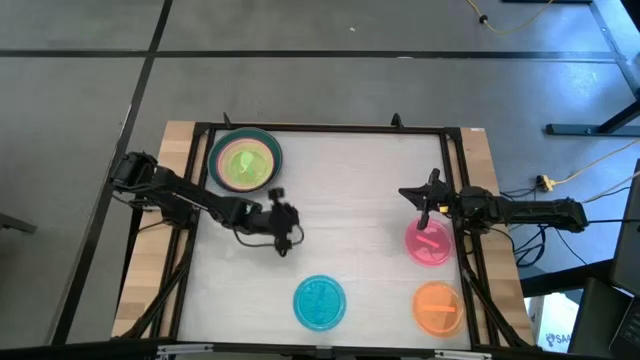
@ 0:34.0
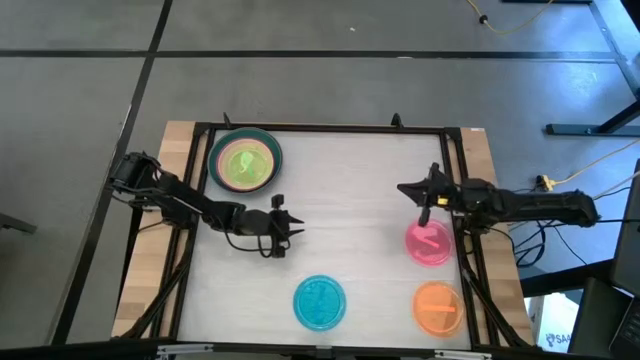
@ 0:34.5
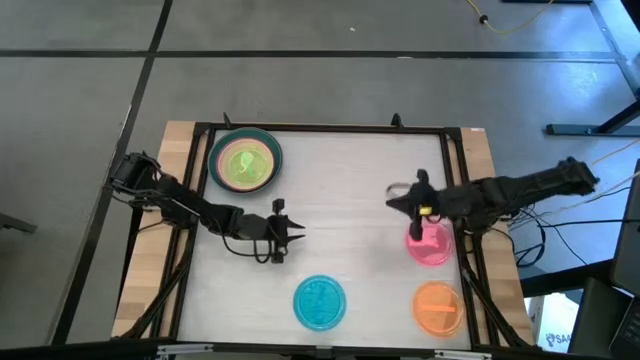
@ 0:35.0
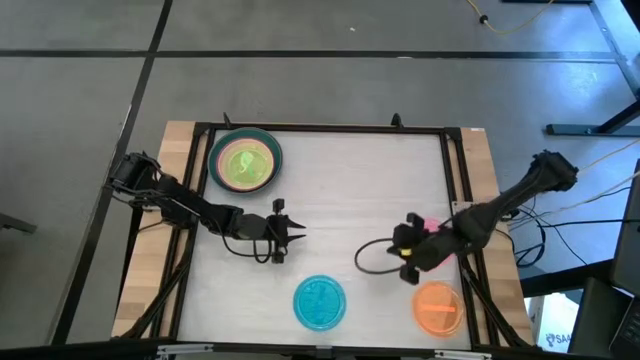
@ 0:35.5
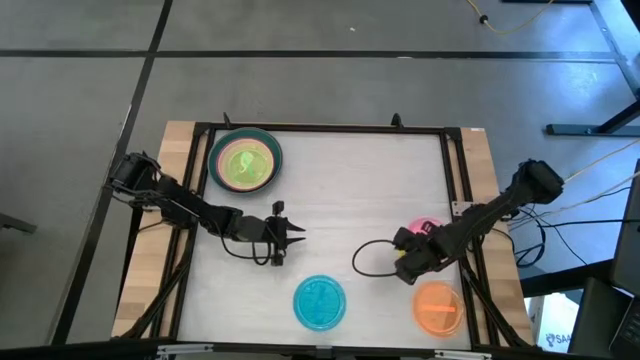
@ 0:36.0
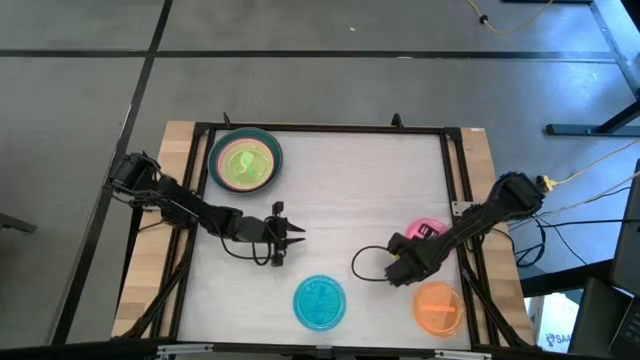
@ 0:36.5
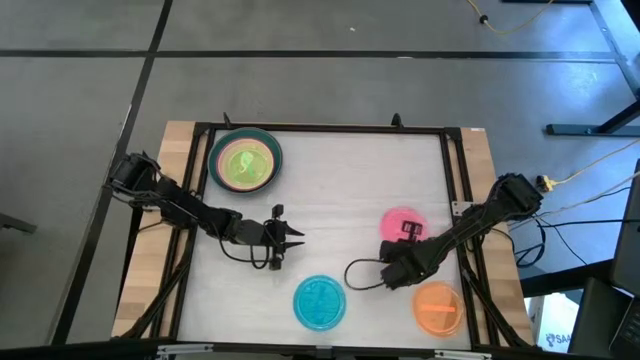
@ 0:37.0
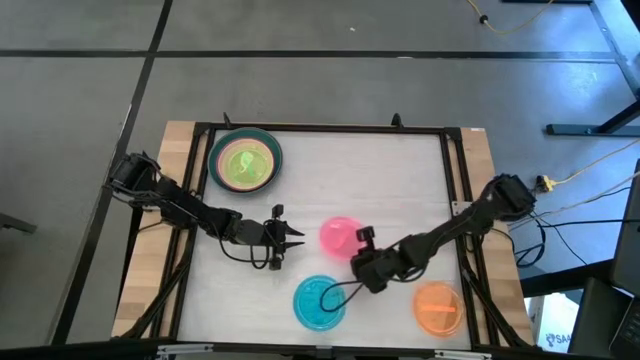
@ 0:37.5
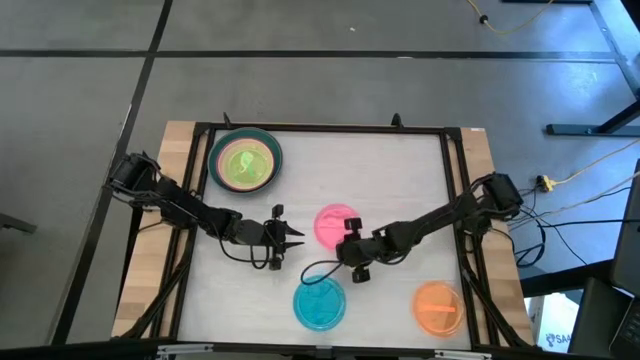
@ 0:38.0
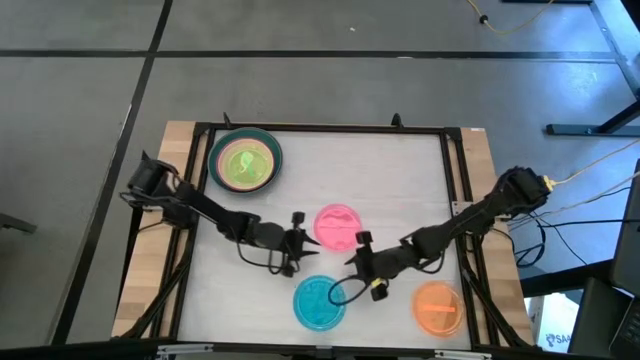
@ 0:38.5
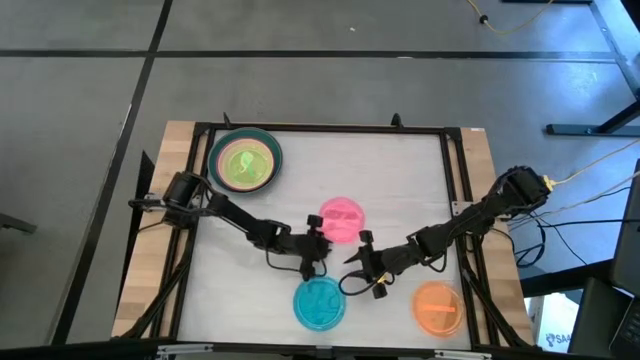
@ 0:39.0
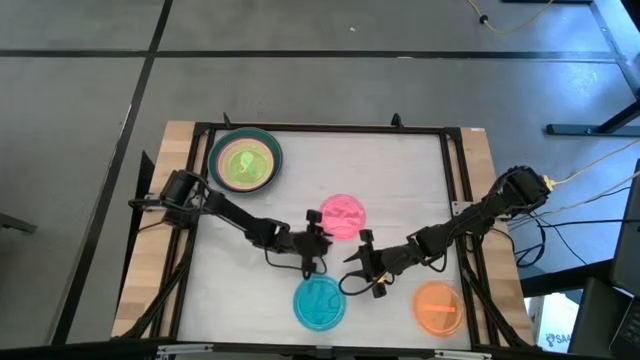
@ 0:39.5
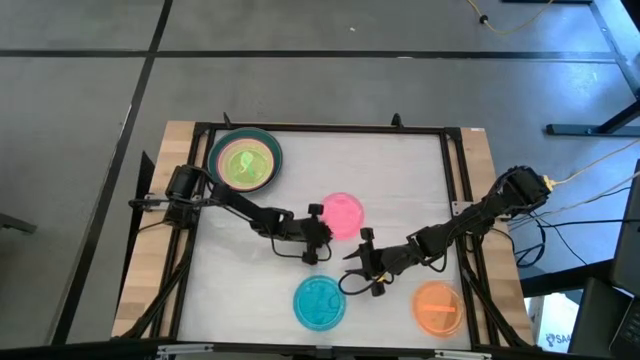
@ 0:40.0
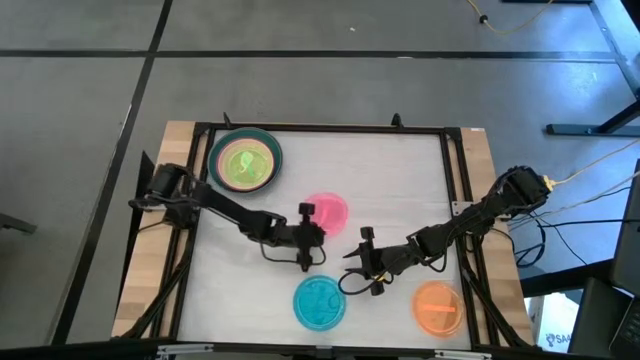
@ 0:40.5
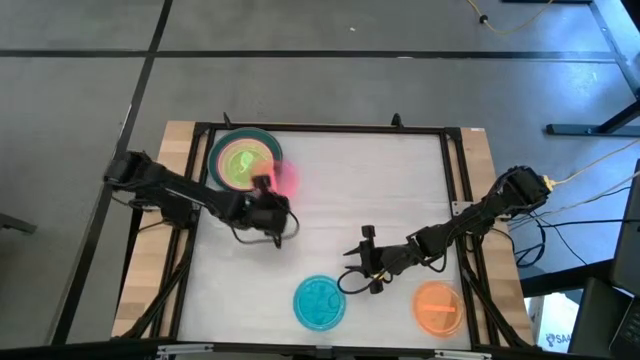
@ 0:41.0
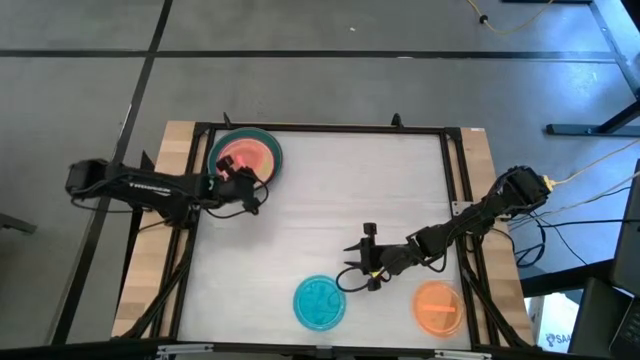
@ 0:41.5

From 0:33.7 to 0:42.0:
Task: Stack plastic plates
Stack the light pink plate on top of the light green plate

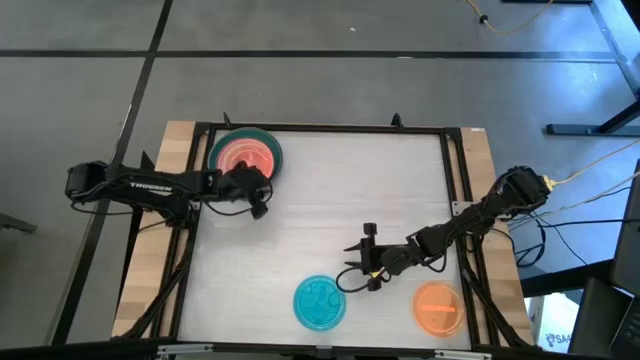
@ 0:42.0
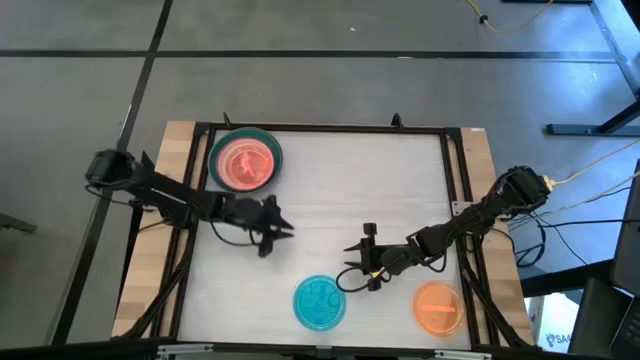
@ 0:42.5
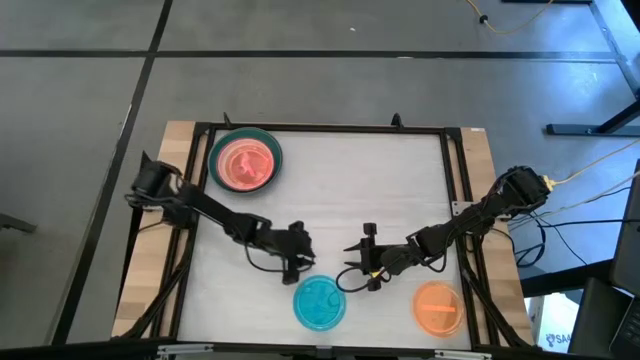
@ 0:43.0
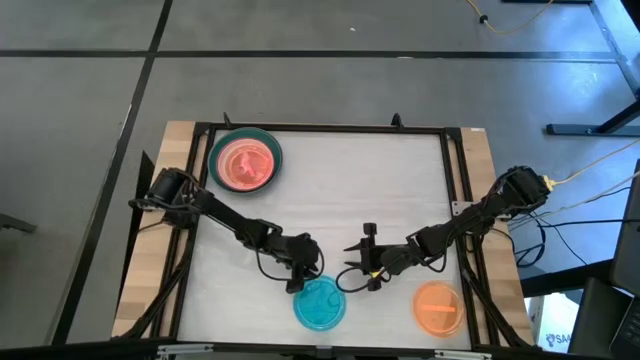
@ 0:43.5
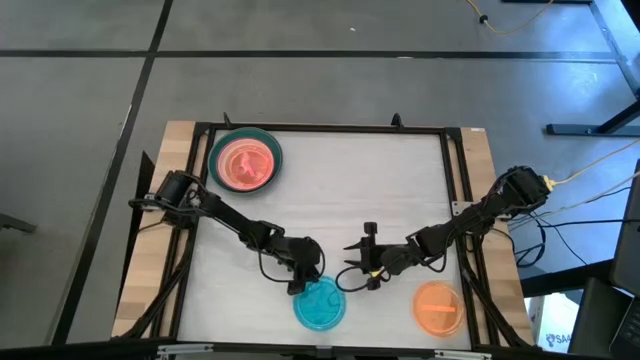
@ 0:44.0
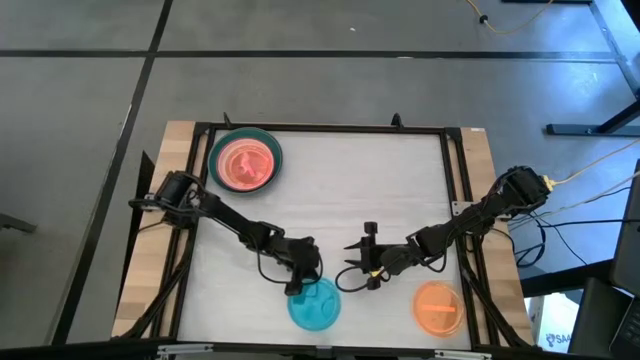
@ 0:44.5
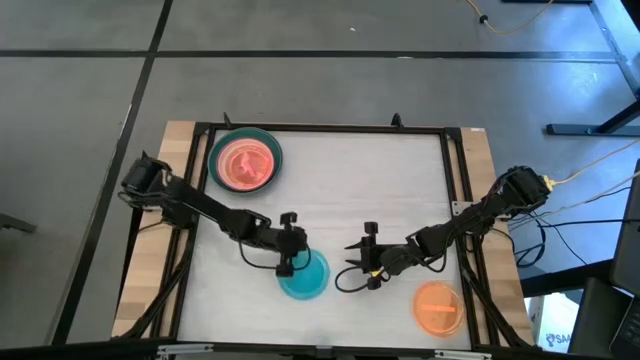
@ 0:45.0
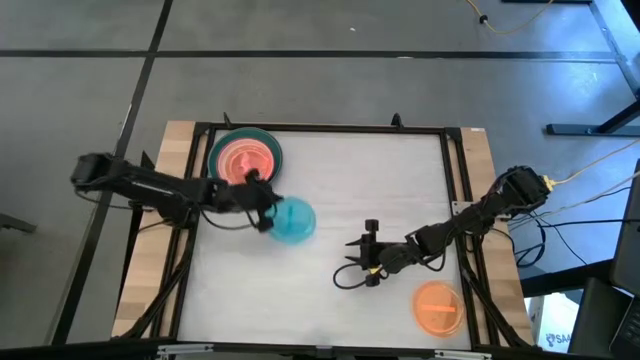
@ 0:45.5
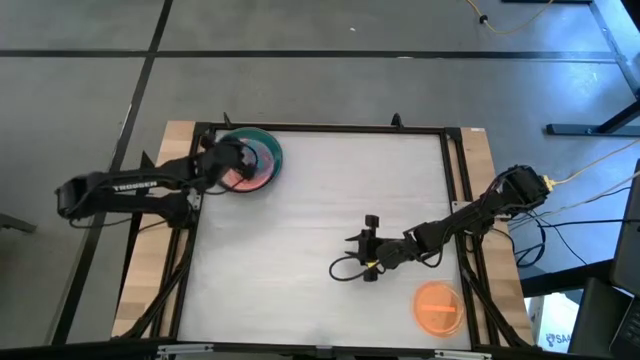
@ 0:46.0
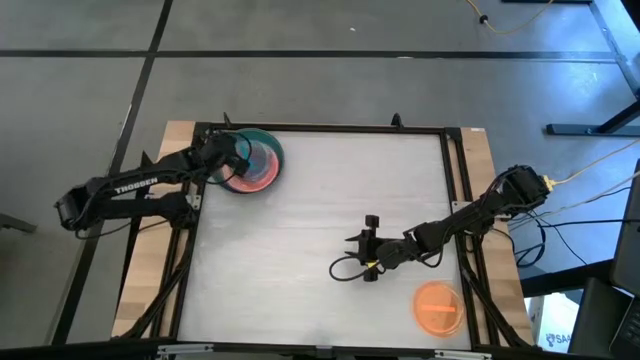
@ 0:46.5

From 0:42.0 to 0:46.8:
Stack the light blue plate on top of the light pink plate

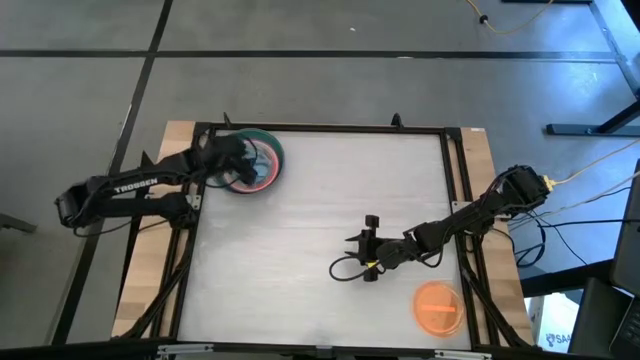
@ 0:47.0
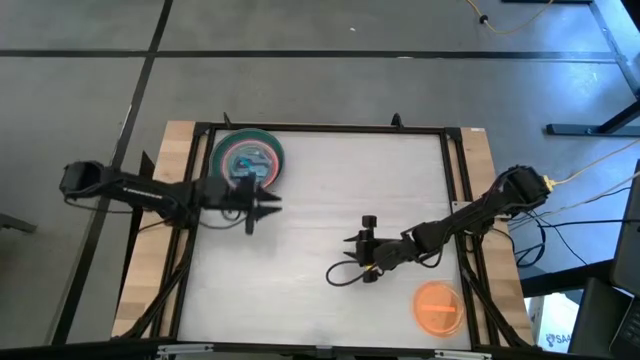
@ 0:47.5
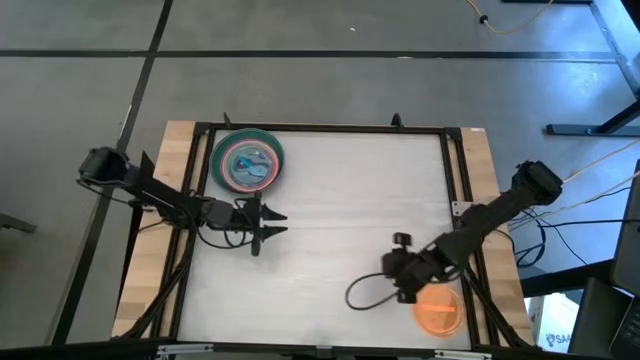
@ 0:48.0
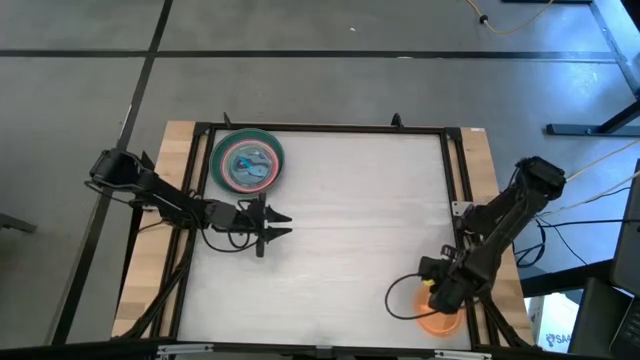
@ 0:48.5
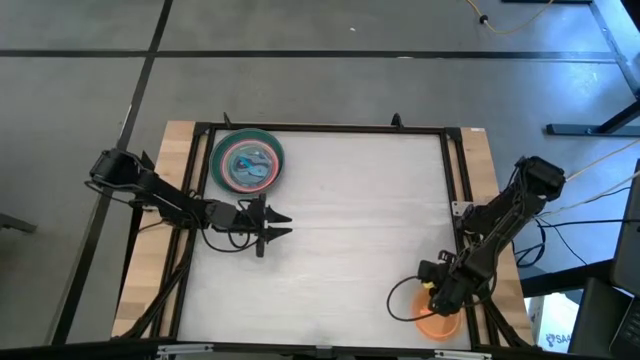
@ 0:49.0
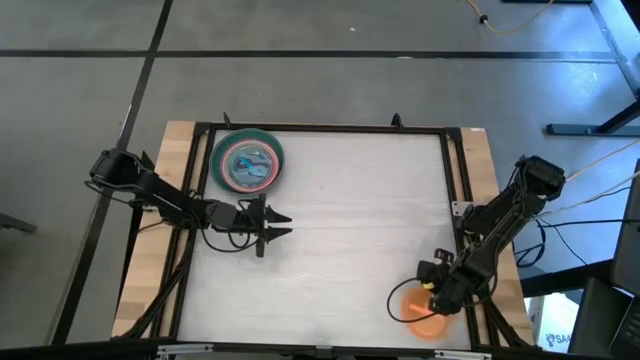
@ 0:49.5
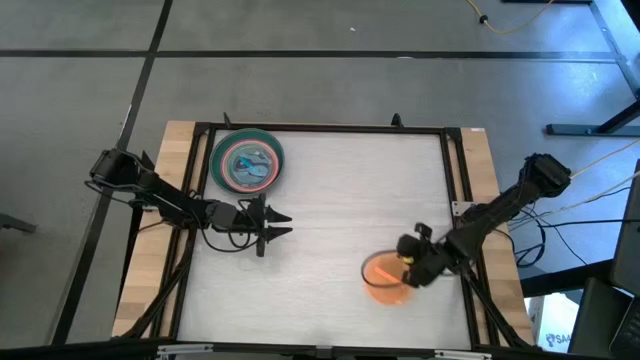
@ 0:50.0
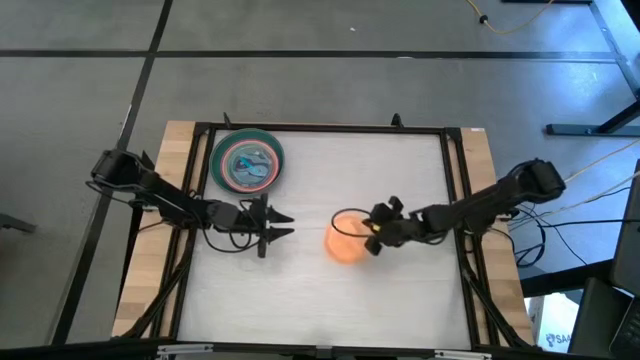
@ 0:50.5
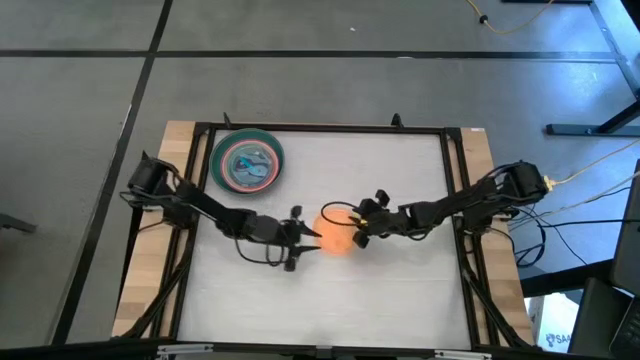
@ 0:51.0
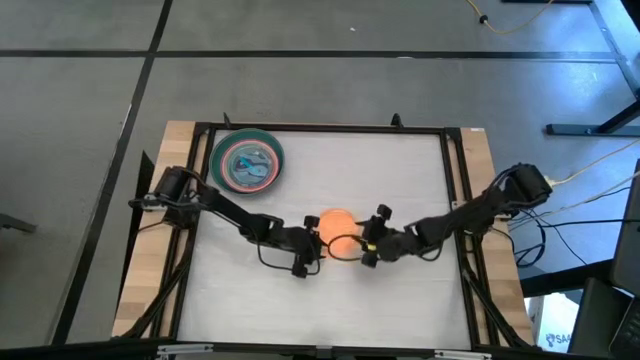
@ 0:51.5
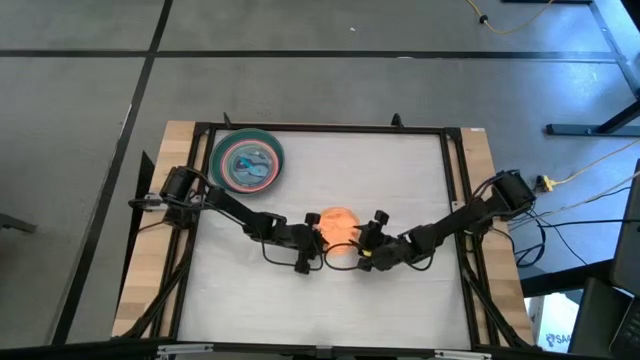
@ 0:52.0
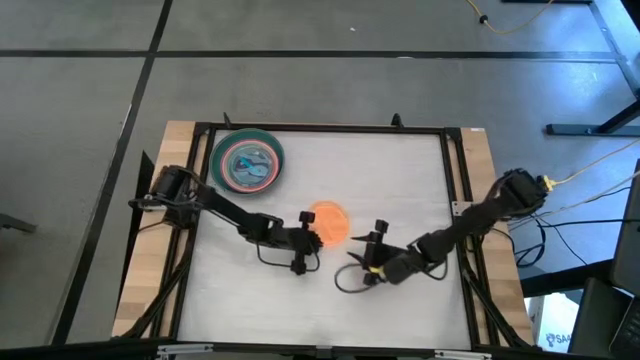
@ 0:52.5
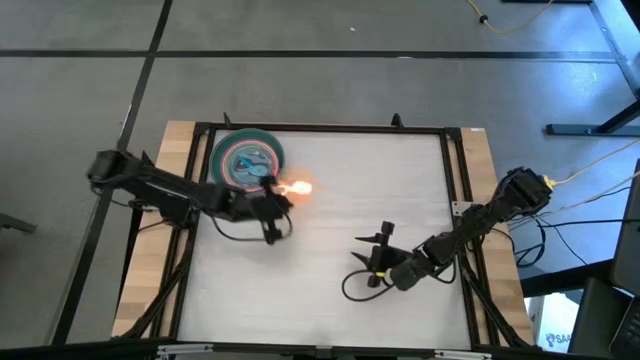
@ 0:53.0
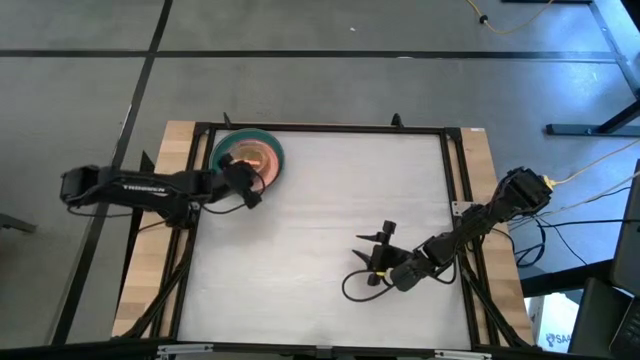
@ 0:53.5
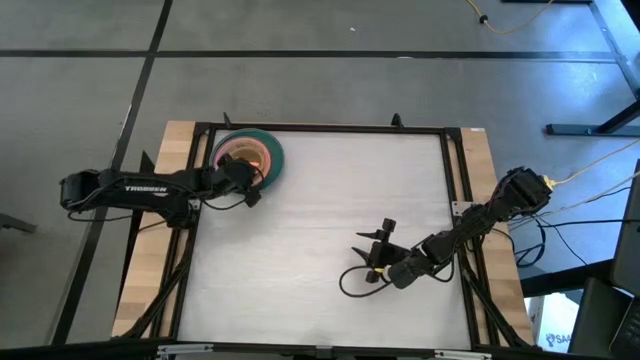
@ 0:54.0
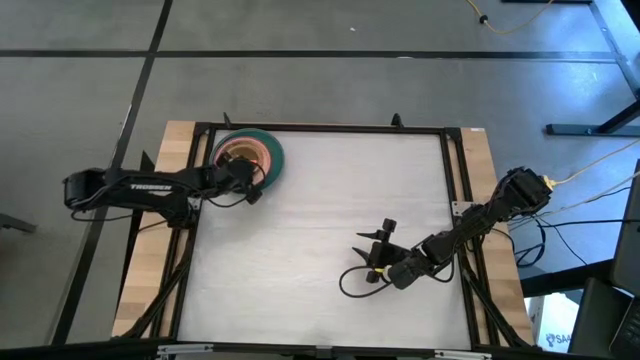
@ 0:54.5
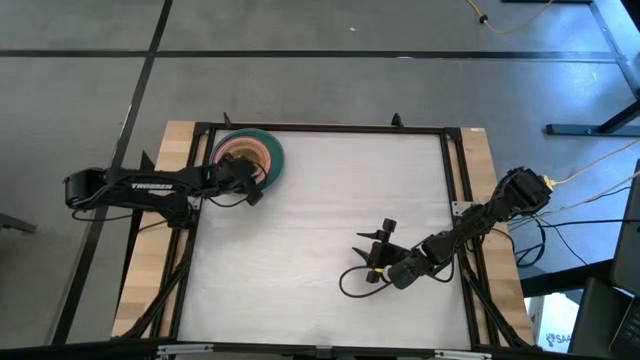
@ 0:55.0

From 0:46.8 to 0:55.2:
Stack the light orange plate on top of the light blue plate
